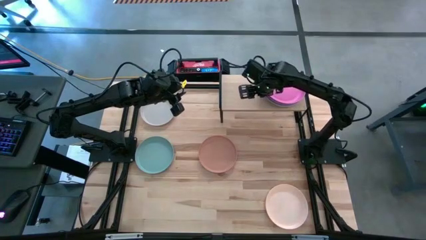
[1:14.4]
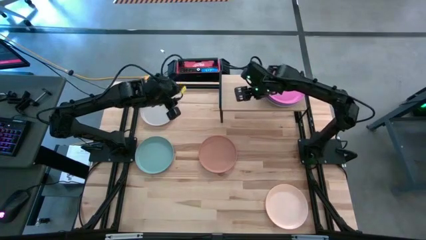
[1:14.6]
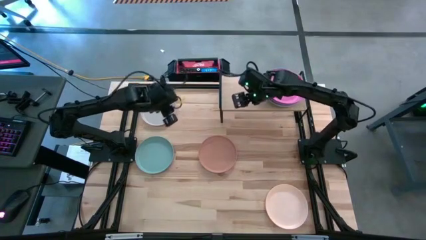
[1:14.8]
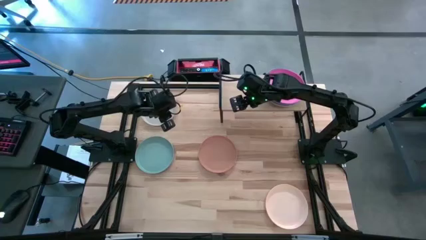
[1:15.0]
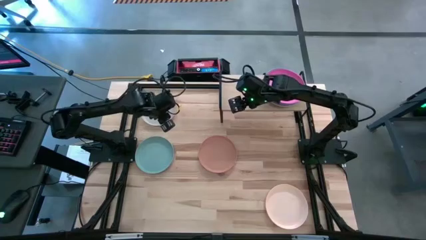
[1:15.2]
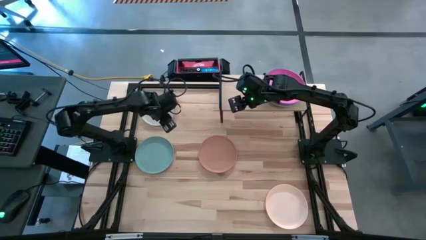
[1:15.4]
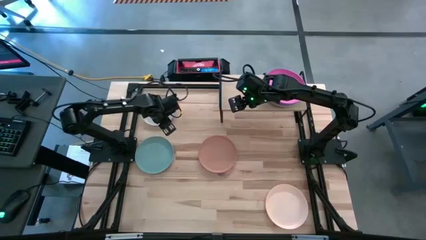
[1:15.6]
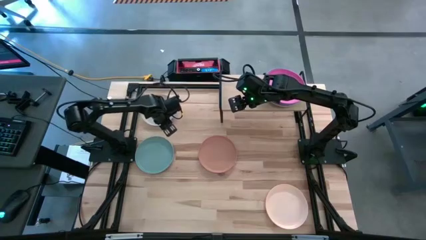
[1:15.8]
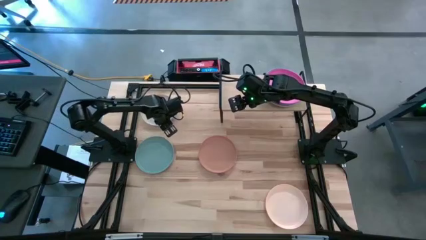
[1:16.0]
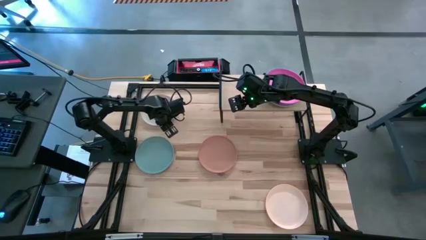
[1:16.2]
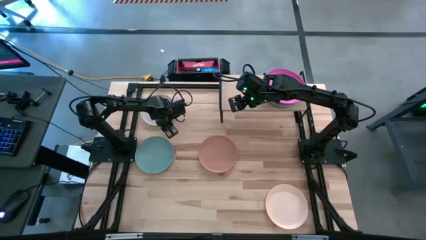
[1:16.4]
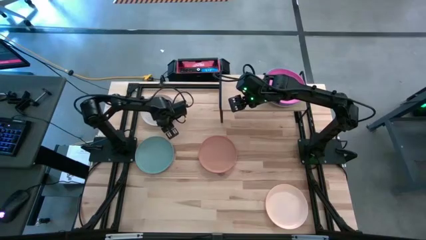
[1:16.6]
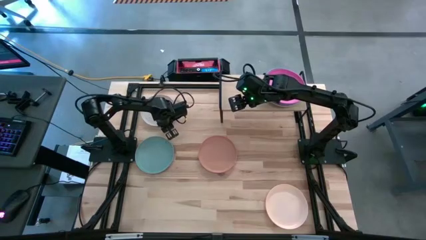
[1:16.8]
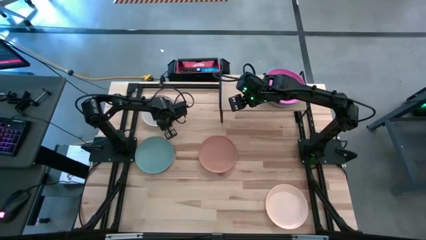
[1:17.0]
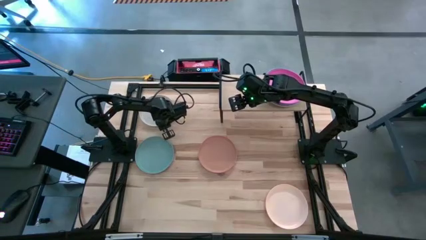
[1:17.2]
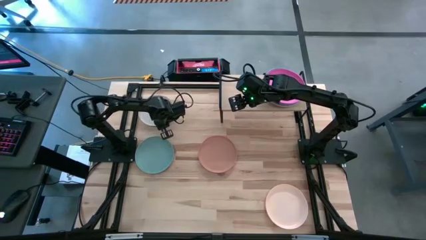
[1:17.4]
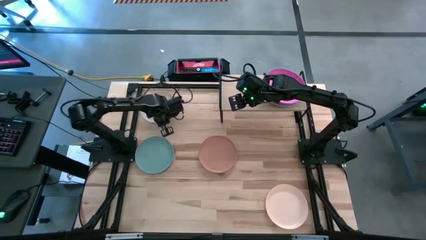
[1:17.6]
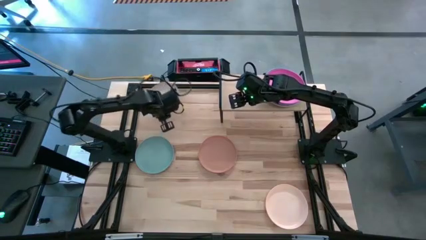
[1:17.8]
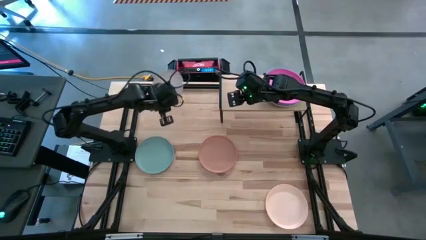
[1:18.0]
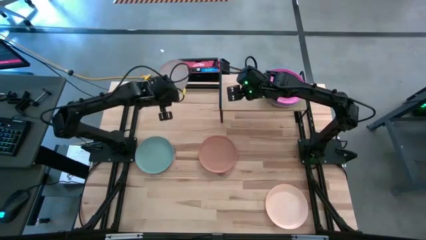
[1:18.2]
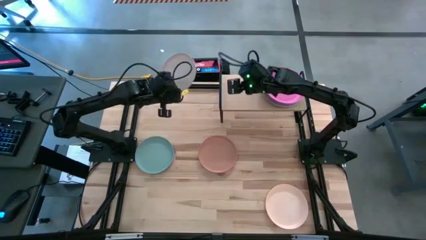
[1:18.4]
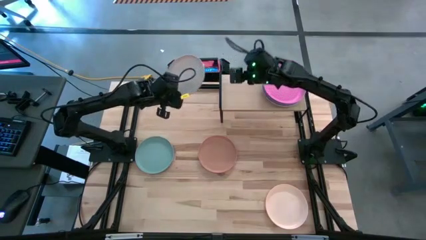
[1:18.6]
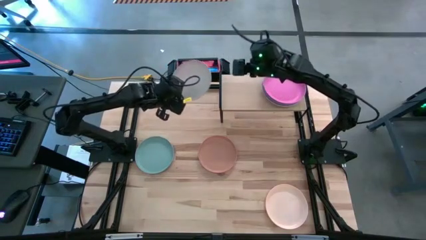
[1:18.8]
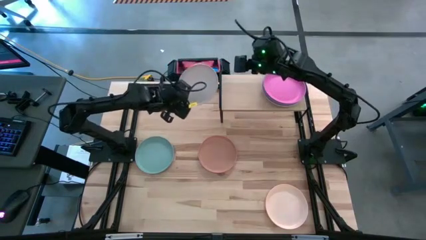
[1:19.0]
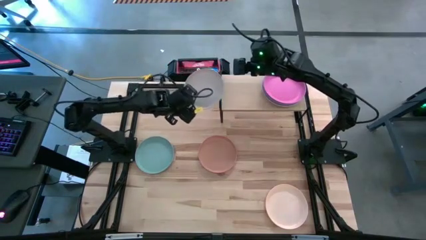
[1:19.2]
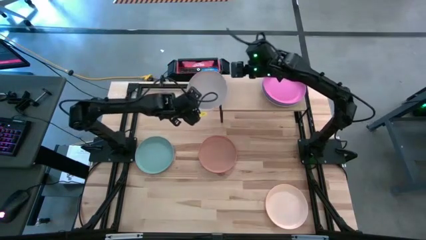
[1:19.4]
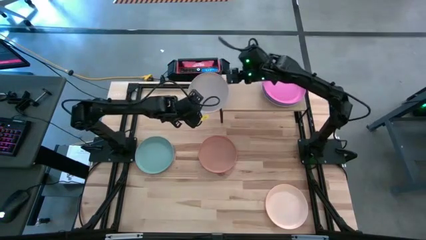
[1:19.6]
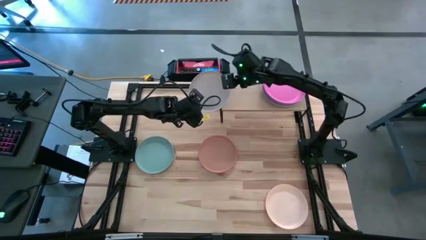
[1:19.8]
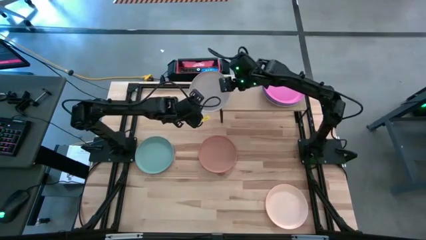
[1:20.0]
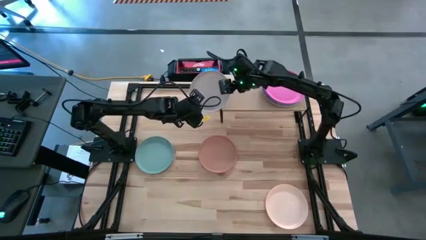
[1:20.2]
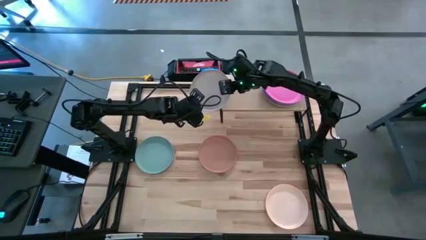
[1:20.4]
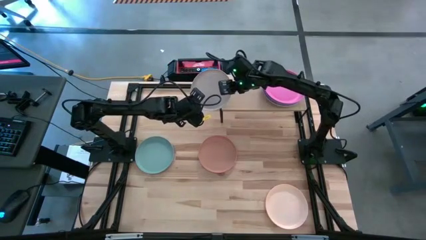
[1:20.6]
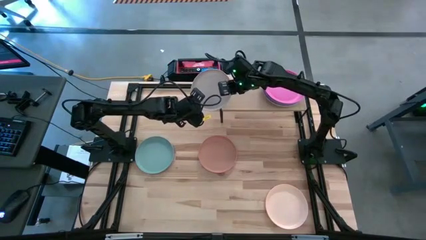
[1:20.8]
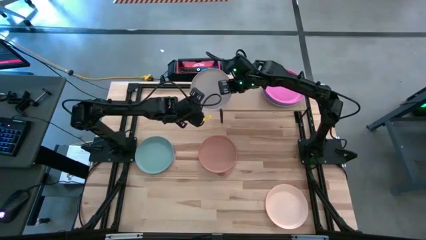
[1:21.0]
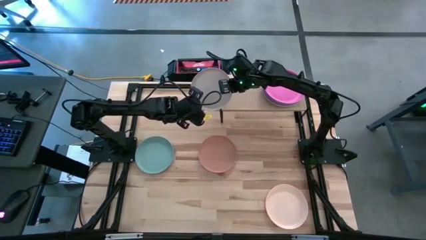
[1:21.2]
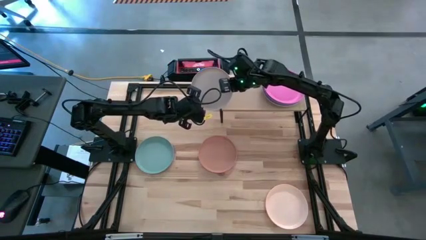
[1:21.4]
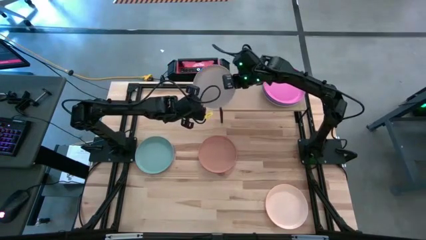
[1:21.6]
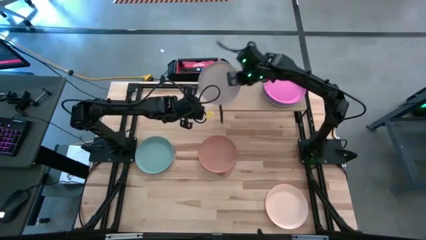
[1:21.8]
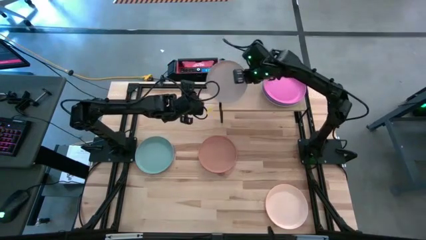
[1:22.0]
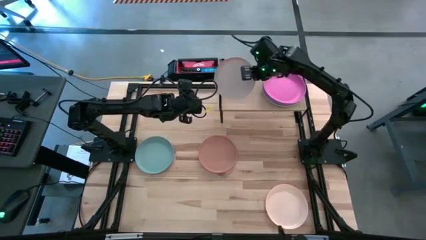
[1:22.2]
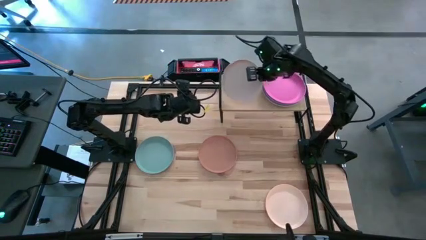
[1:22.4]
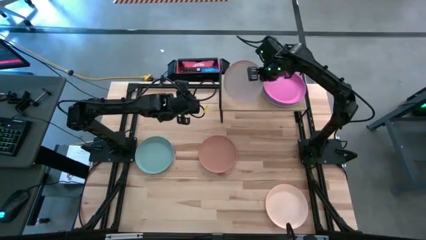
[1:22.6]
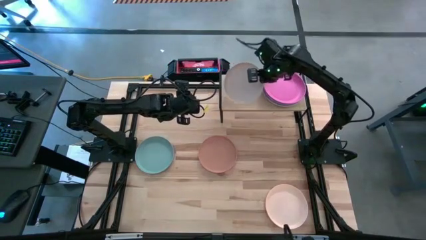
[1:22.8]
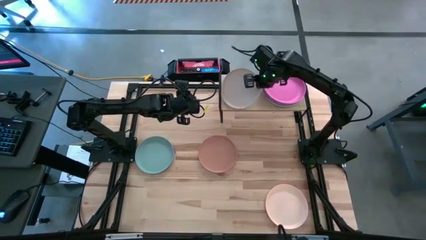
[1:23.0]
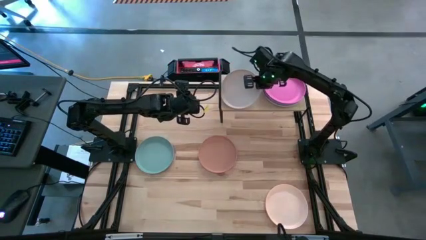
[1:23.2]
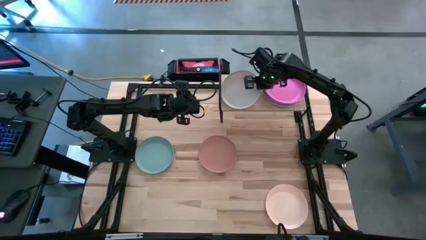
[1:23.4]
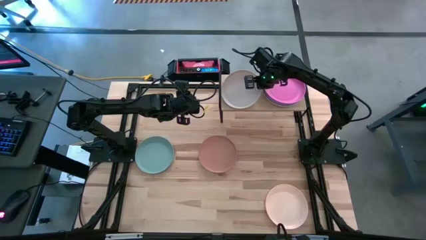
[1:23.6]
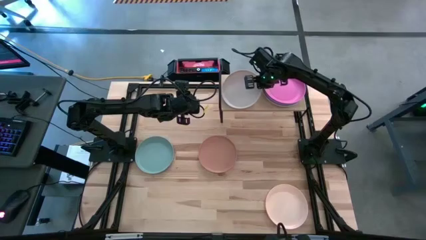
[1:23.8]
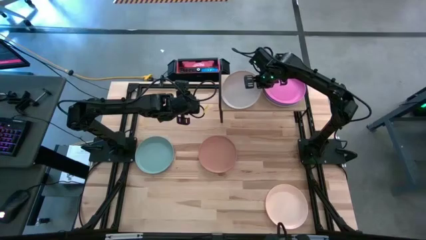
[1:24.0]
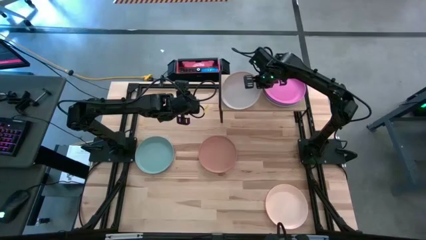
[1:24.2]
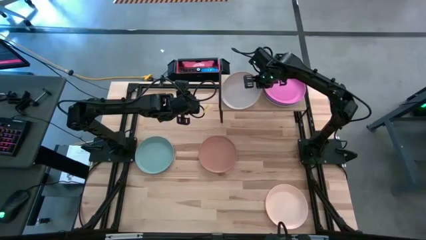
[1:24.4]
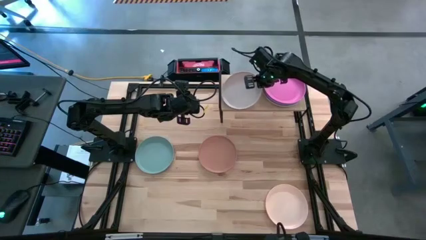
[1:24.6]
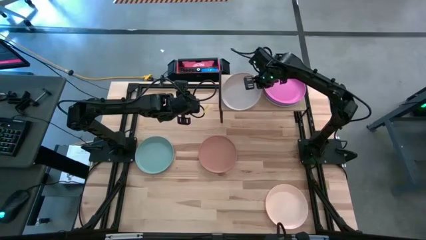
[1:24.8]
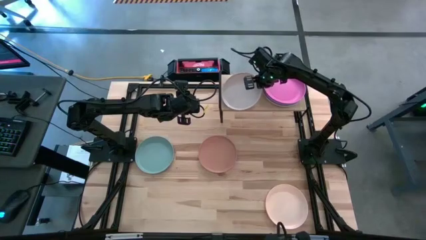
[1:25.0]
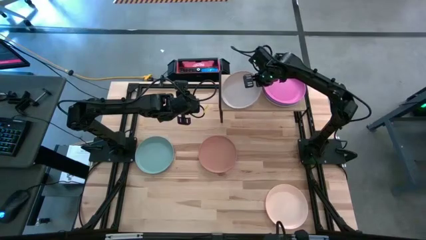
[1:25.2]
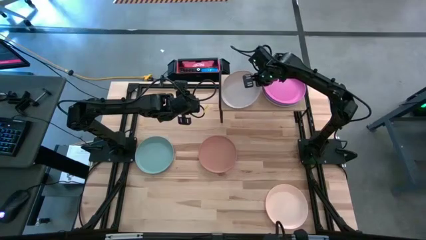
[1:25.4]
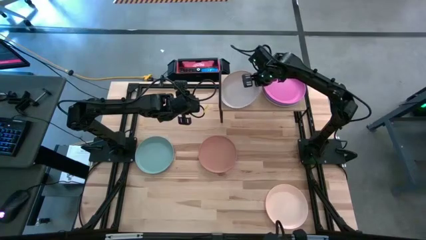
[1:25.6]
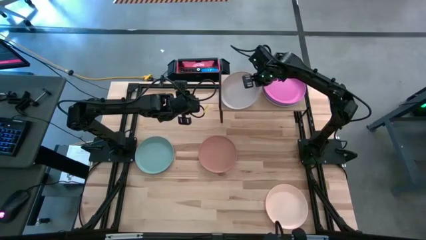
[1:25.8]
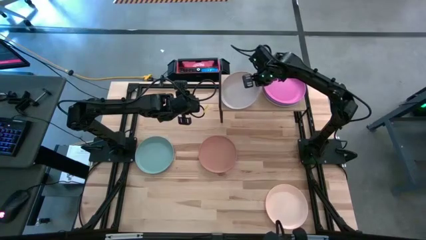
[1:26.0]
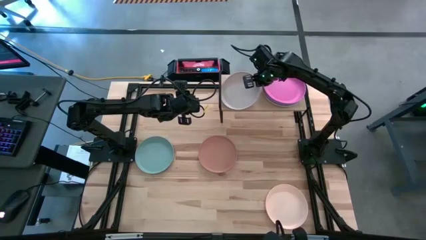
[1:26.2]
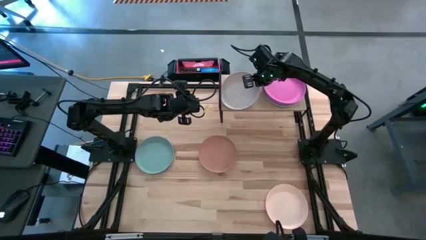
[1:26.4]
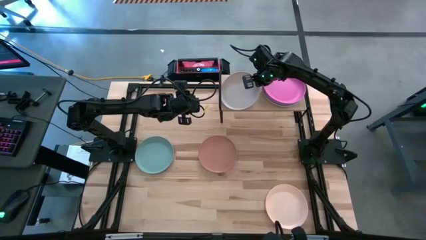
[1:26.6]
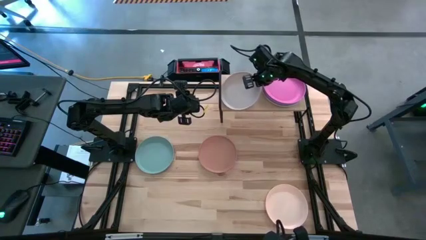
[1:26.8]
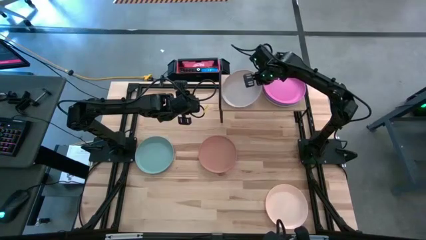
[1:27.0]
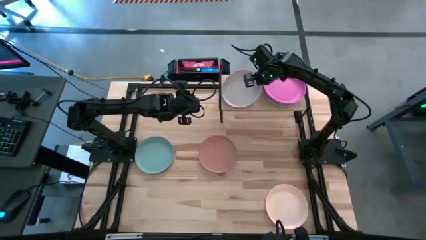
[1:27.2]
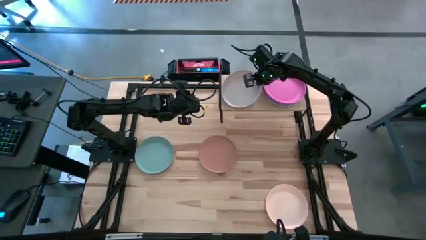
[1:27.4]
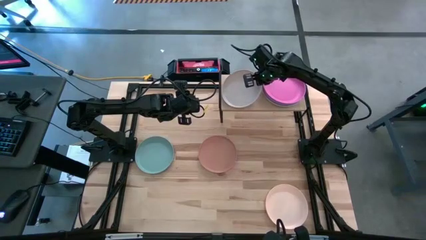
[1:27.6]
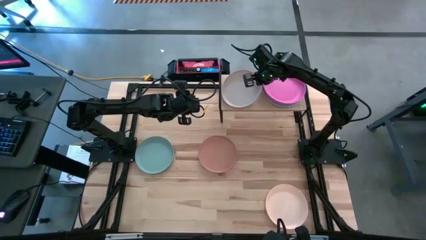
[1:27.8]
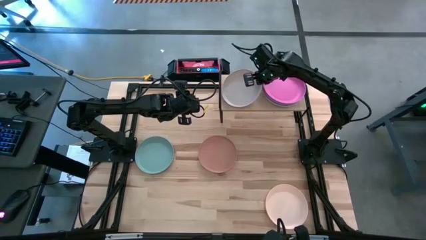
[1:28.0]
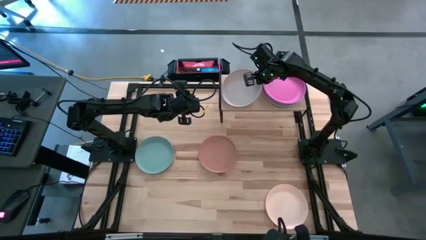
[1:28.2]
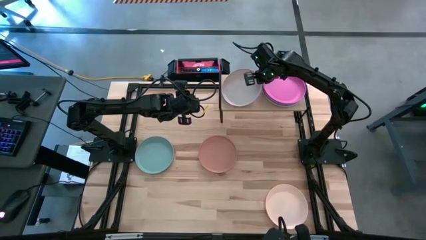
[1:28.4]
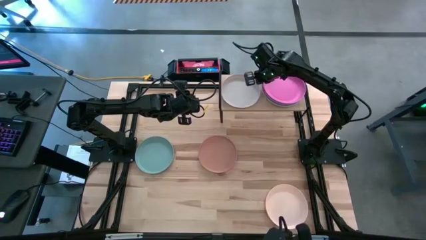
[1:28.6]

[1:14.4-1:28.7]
Task: Place and stack plates onto a shelf
Put the white plate on the shelf

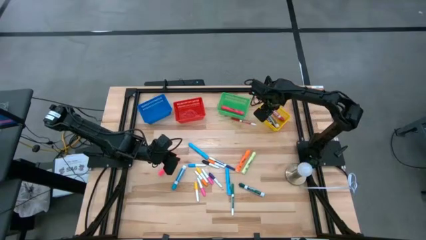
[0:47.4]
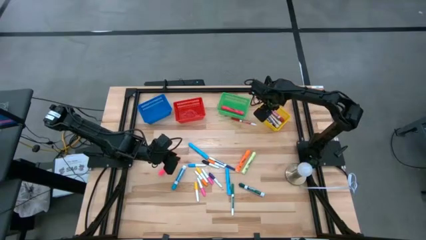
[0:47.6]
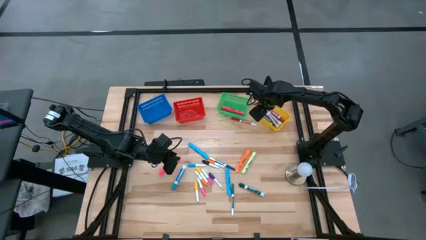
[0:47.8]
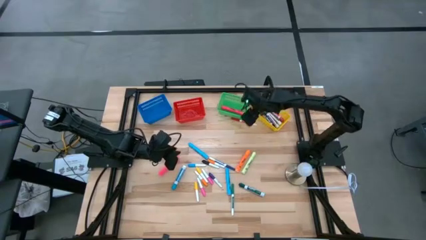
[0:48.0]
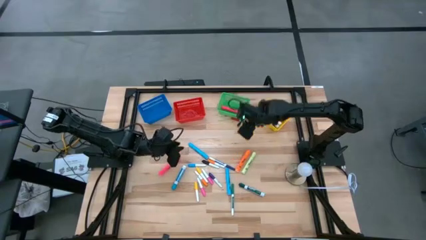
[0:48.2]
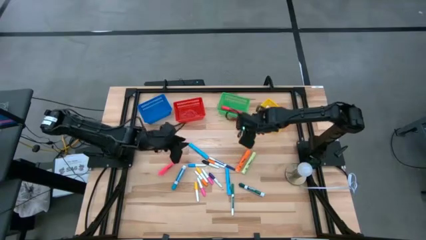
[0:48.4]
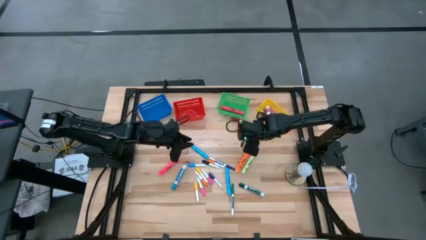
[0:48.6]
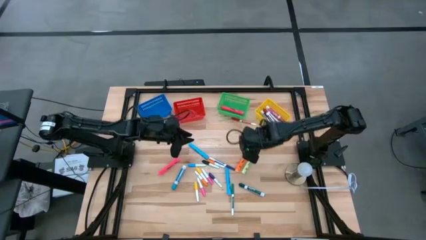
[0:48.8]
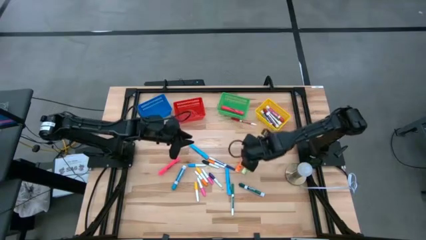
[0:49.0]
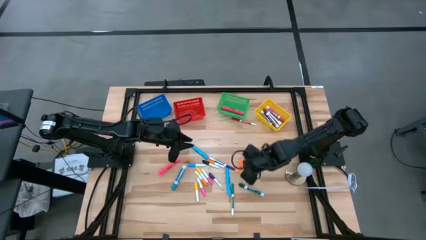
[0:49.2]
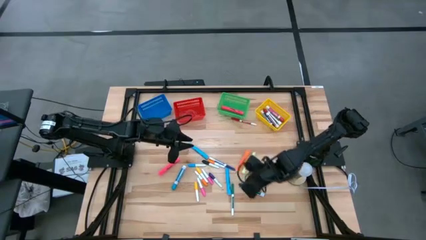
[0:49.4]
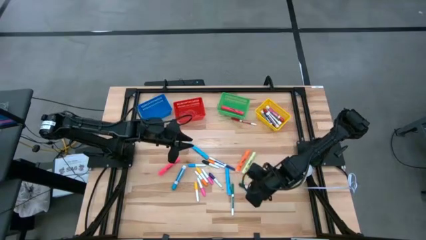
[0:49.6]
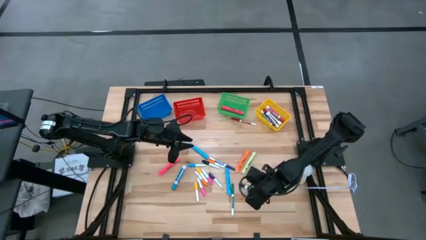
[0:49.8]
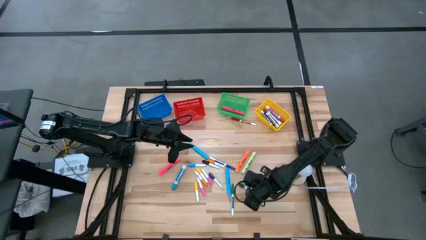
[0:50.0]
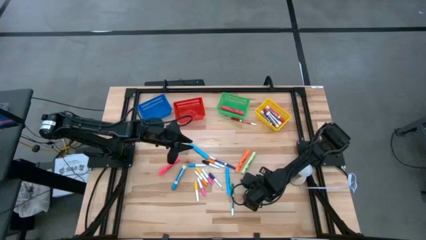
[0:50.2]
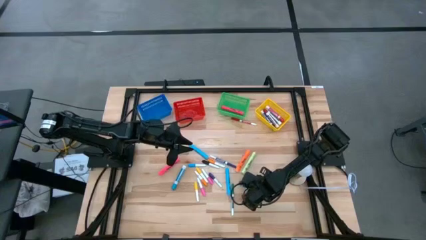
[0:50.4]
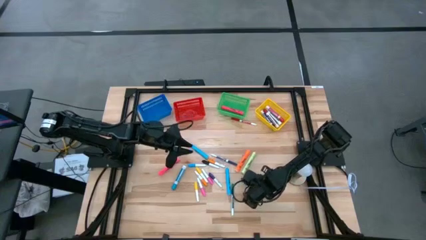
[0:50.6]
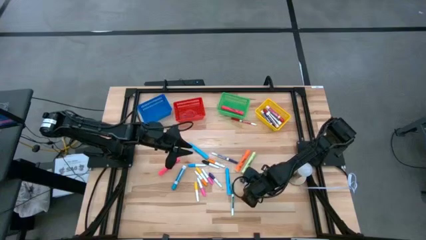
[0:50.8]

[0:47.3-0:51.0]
Task: Pick & Place Markers
Put the large green marker pen into the yellow bin
